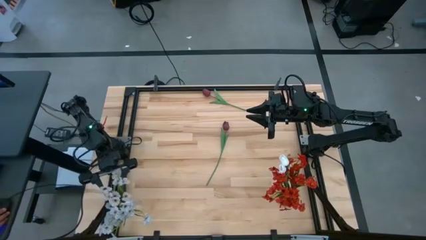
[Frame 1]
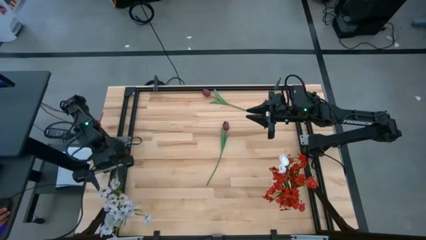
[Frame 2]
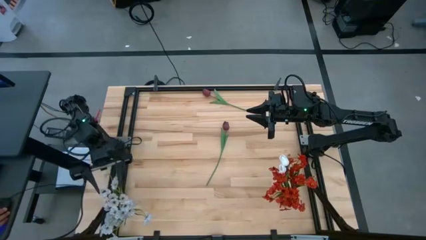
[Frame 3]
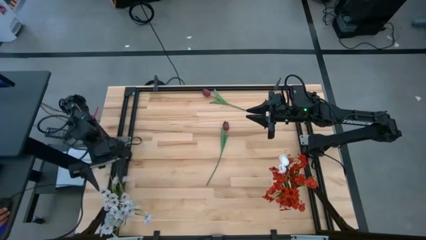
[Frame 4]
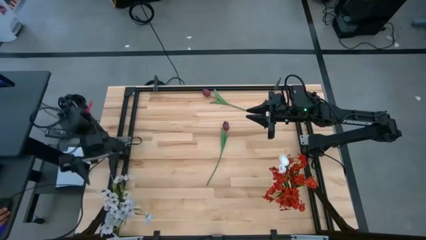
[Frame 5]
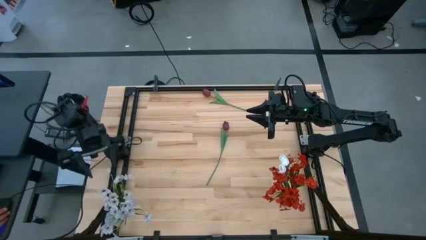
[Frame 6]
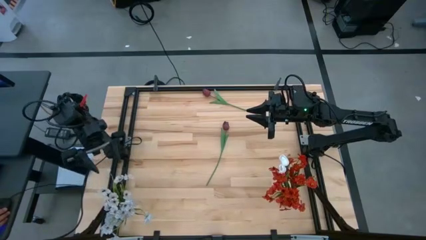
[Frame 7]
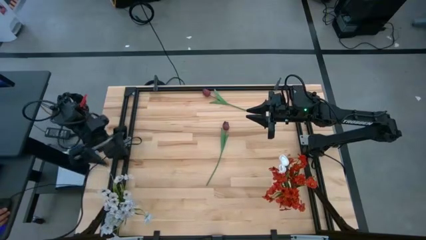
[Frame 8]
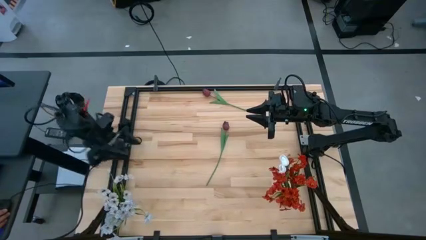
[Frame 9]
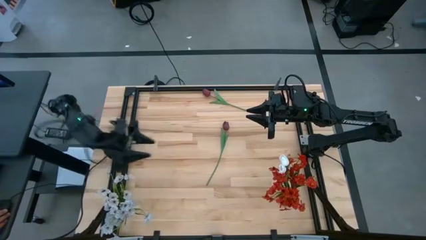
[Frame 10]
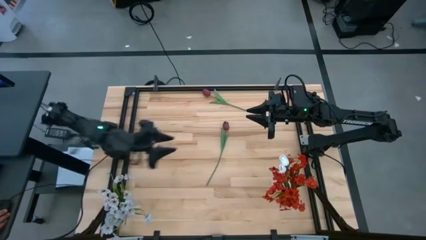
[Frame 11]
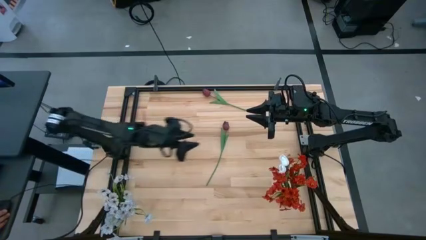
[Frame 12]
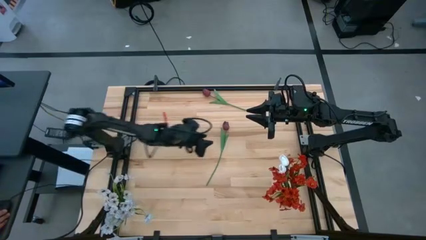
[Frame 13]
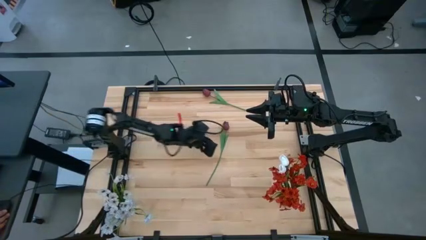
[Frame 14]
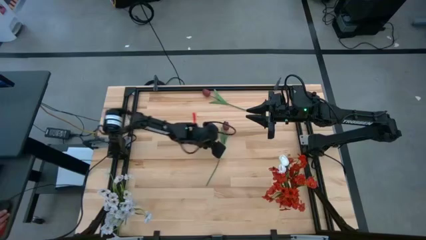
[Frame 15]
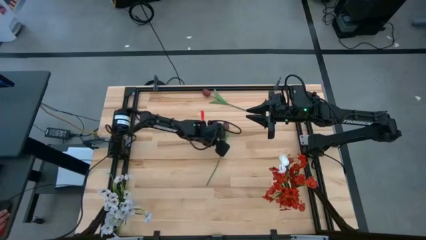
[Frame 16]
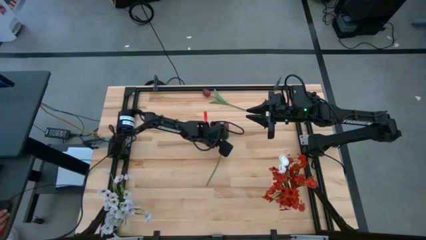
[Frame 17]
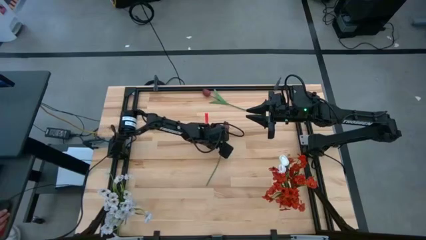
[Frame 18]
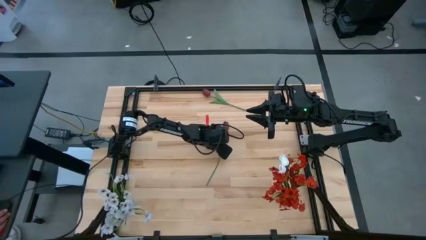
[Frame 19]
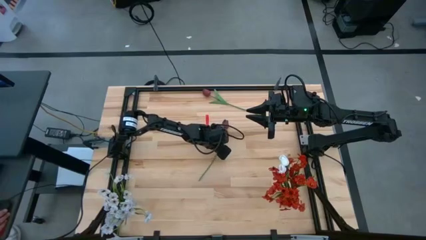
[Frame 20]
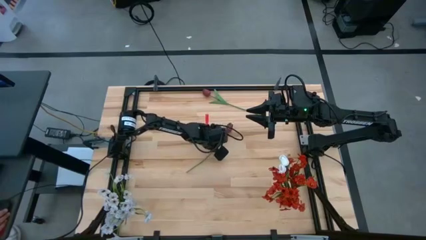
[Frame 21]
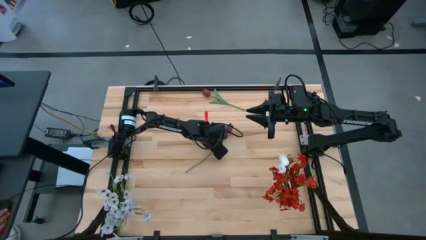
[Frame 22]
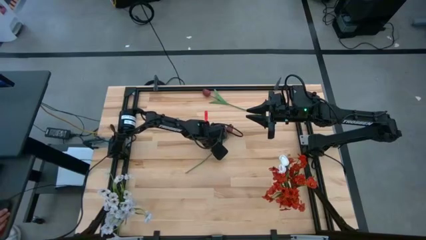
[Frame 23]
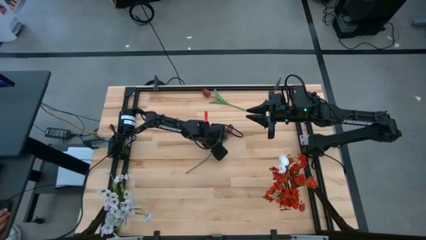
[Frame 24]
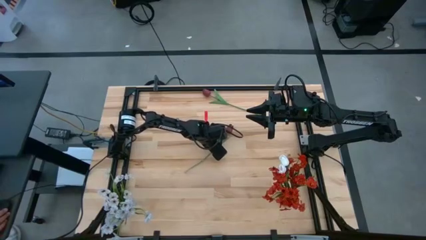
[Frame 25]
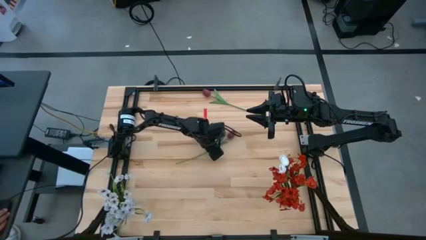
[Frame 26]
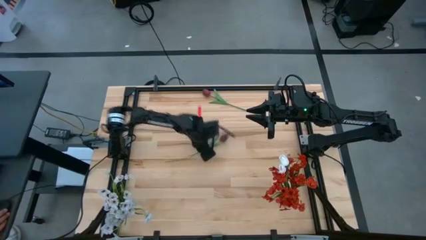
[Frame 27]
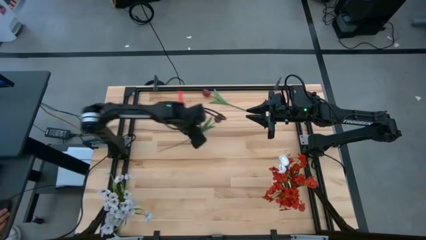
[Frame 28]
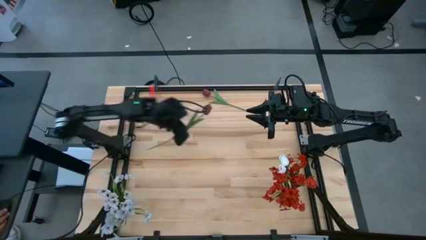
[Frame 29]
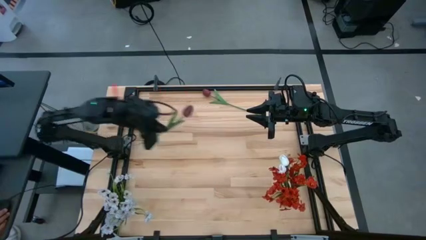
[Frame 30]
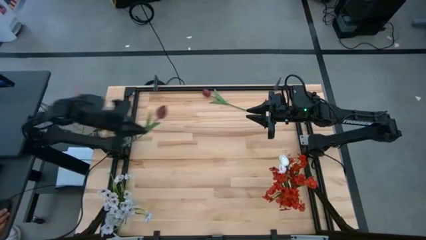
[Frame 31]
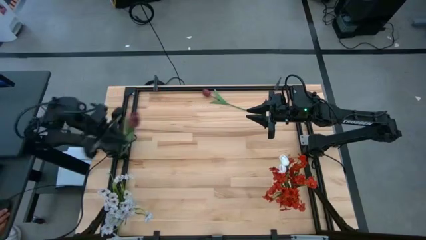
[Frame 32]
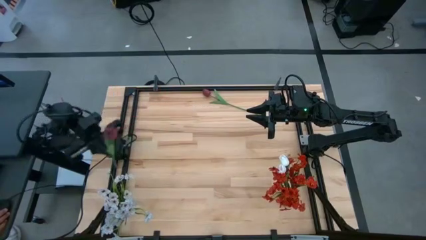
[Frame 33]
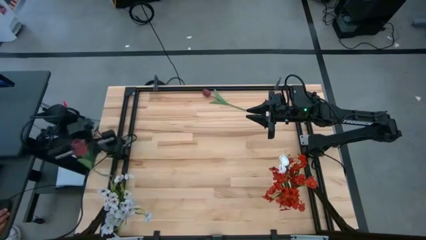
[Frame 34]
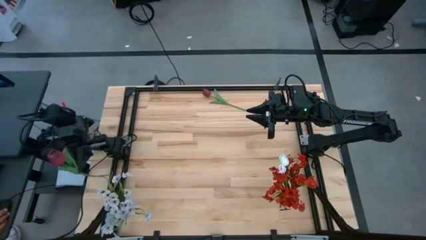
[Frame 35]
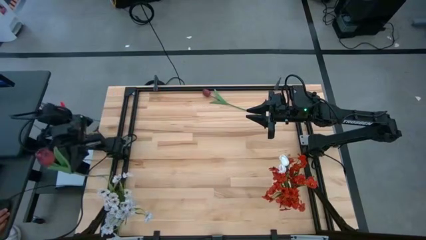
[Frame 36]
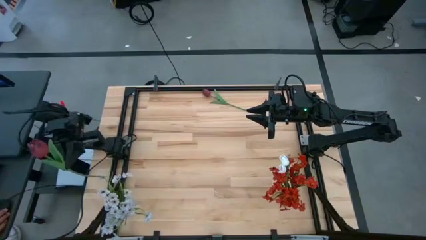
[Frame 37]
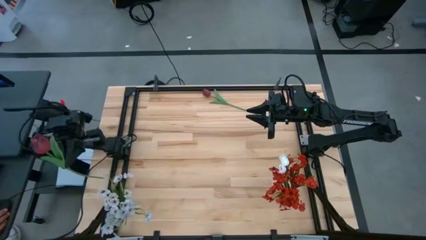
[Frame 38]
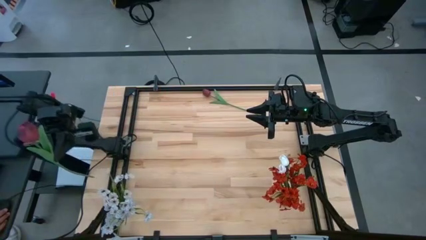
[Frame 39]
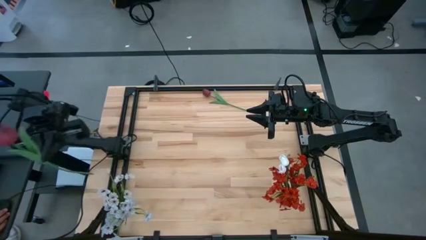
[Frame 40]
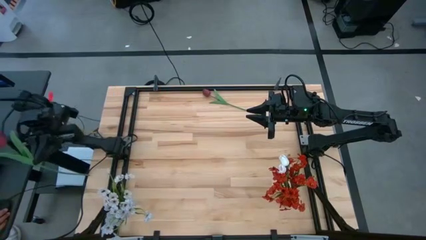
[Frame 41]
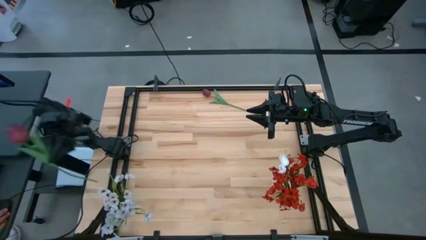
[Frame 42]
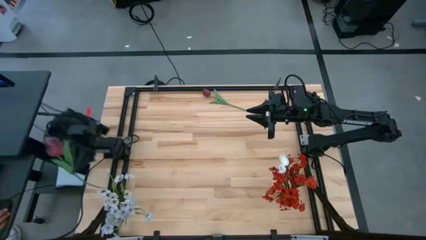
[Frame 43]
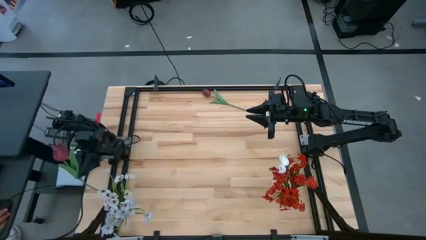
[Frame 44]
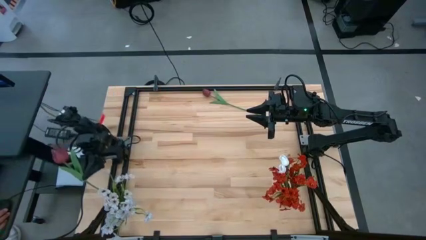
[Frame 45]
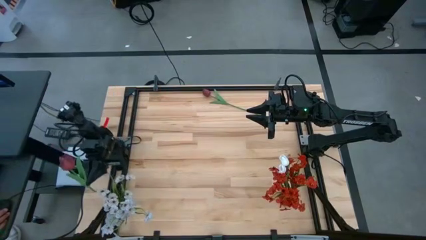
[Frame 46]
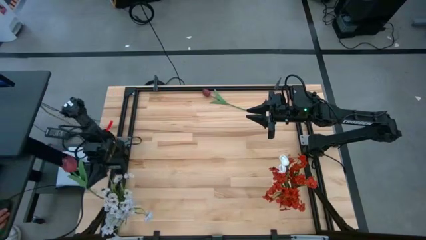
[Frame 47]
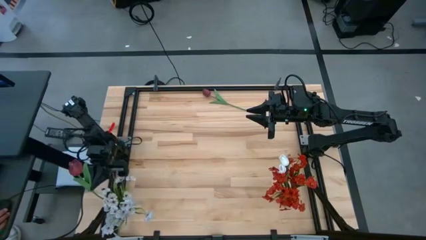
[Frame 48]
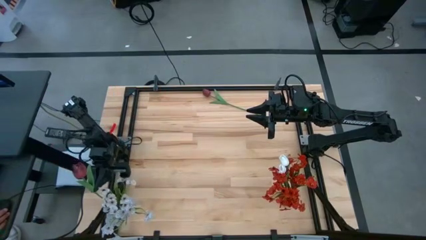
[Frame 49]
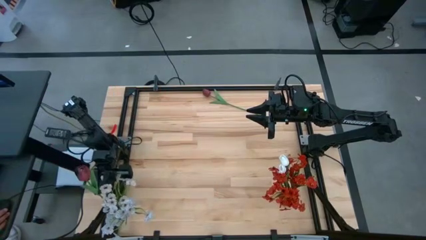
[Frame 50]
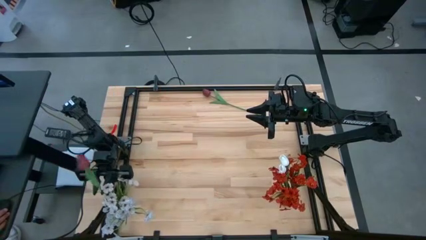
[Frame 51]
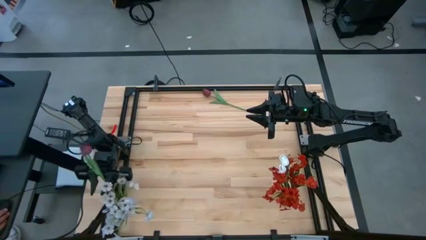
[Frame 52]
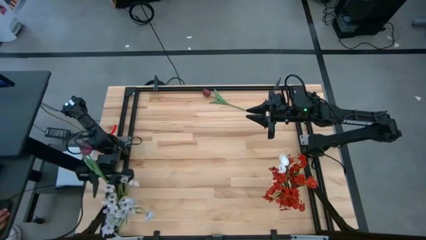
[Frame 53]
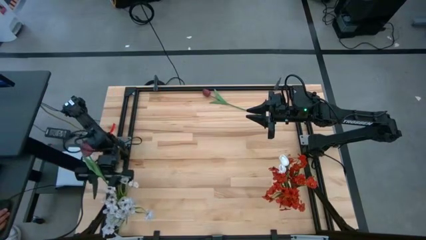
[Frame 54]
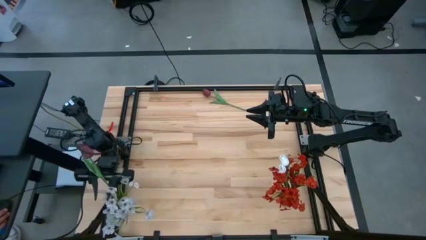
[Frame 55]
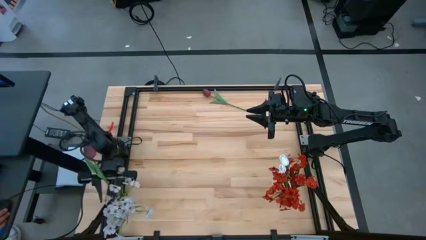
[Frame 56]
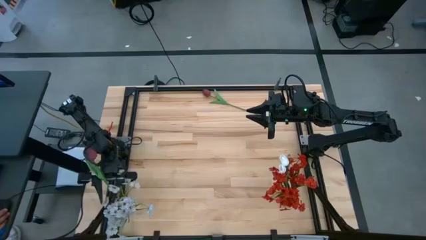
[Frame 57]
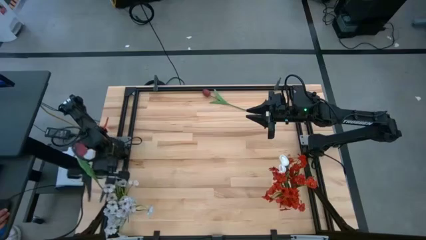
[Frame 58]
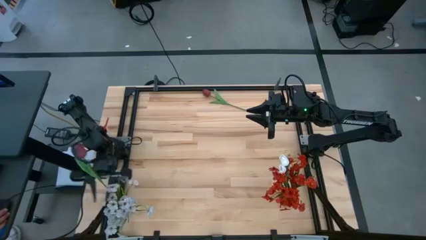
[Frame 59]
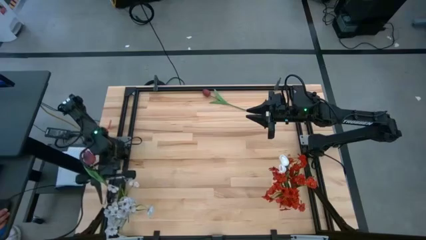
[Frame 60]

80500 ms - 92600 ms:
Task: Sort flowers into vase by color
Put the bottom red flower into the transparent vase

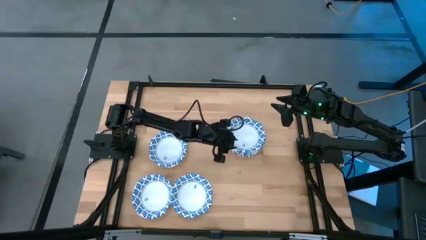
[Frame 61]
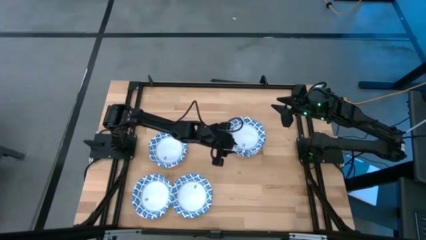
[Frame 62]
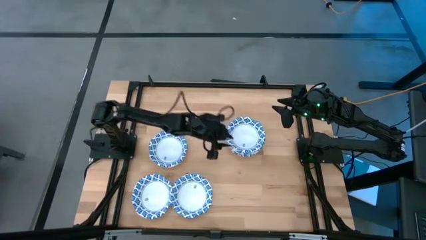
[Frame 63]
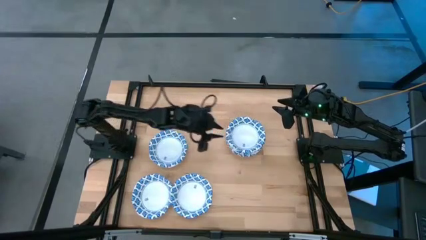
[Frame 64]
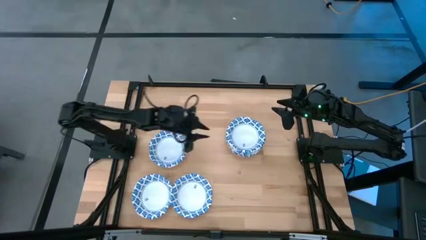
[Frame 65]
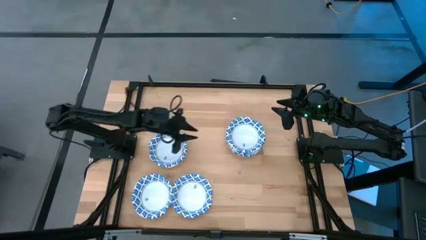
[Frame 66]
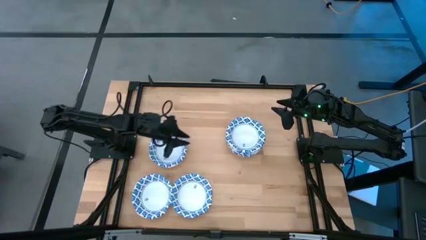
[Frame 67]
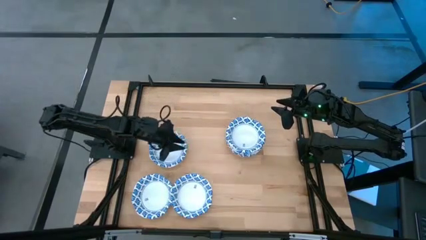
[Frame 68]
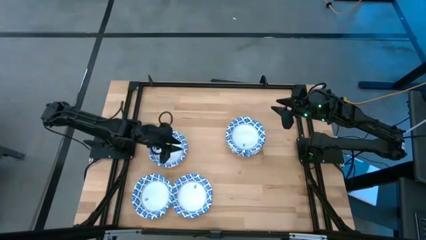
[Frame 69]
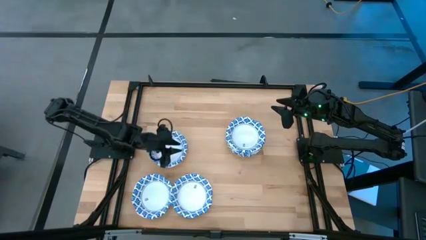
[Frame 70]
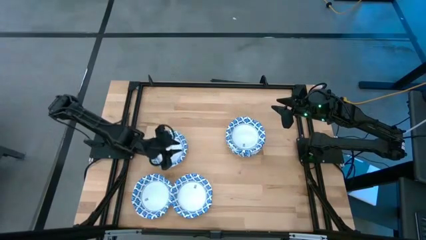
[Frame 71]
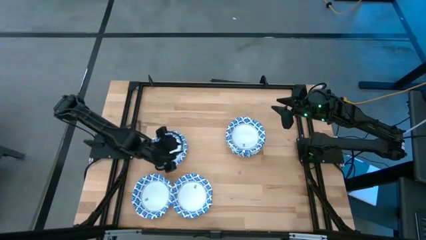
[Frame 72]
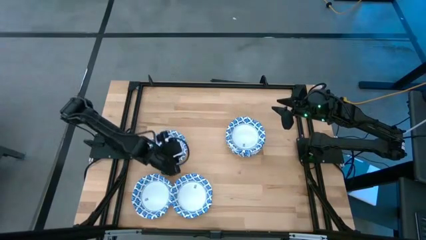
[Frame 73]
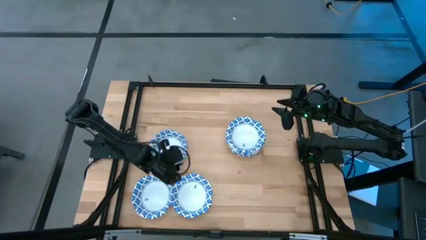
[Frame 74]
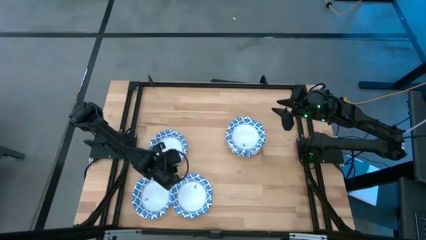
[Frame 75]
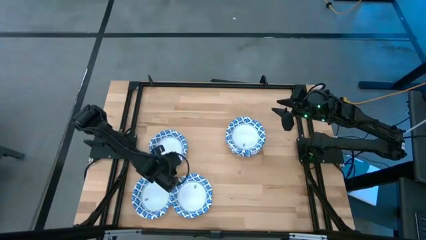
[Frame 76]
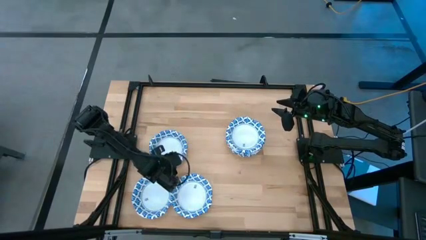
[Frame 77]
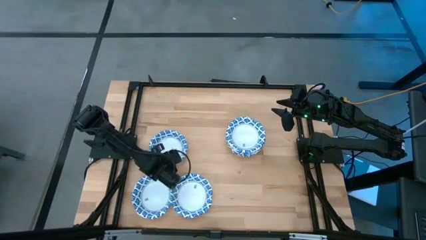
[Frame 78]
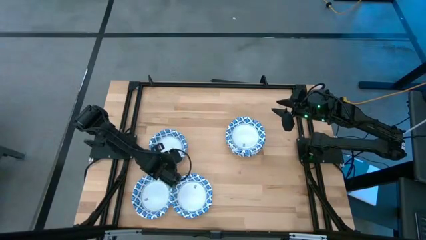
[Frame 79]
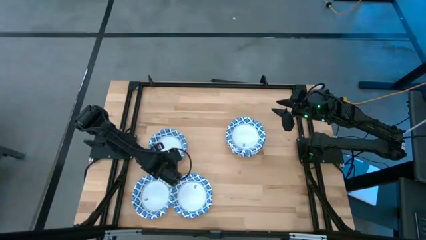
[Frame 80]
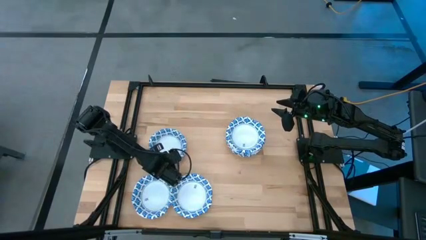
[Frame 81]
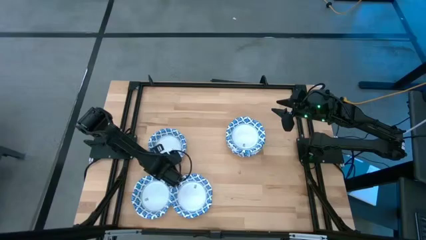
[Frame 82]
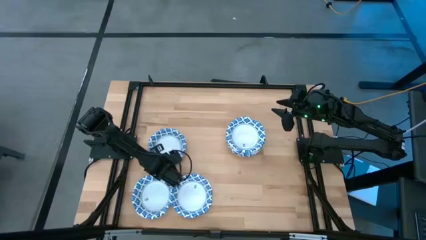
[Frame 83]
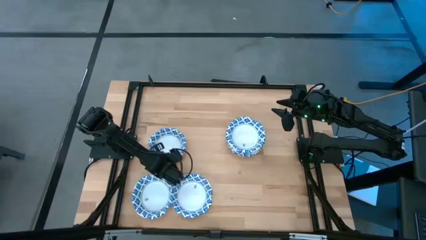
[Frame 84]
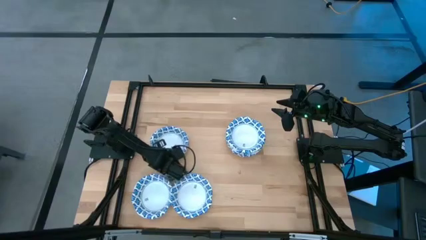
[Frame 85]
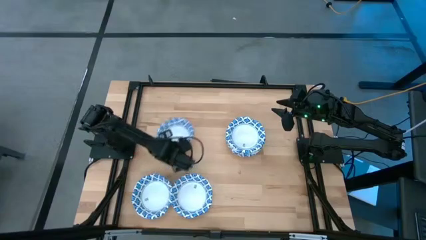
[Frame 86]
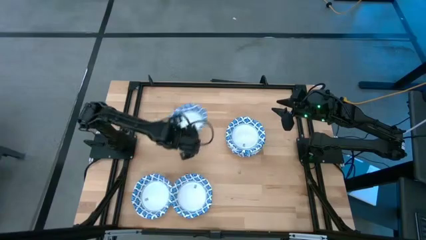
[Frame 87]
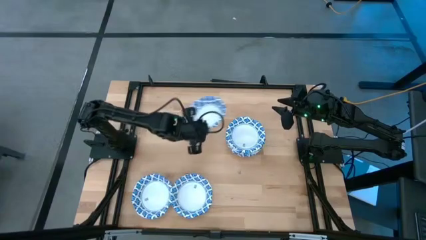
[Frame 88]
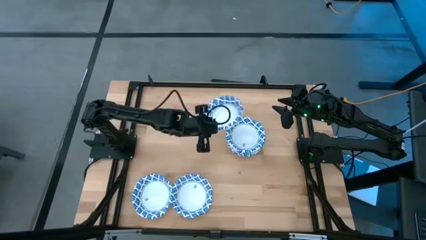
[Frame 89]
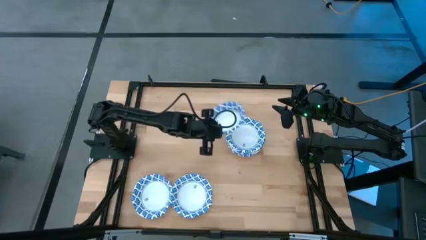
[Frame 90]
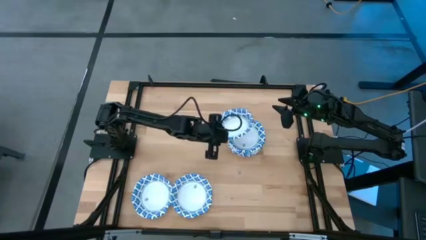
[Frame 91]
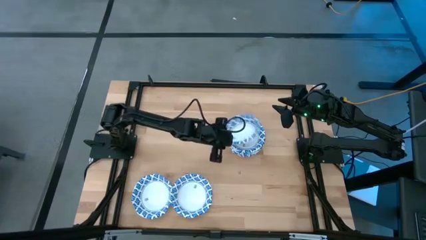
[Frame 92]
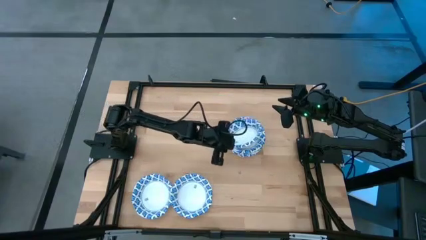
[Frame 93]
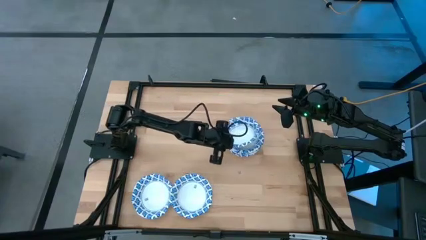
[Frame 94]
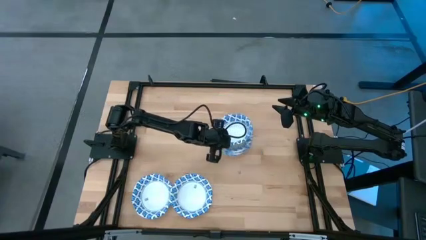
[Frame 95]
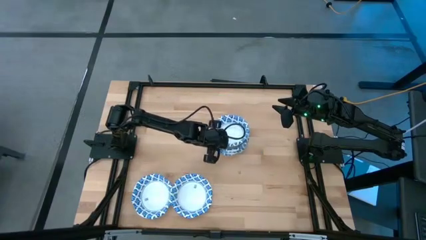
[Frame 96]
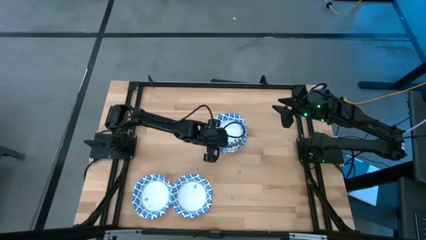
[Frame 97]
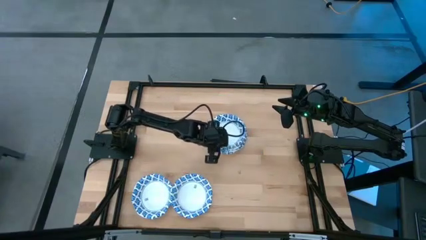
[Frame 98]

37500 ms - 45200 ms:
Task: Nest bowls inside each other
Stack the white bowl on top of the white bowl
